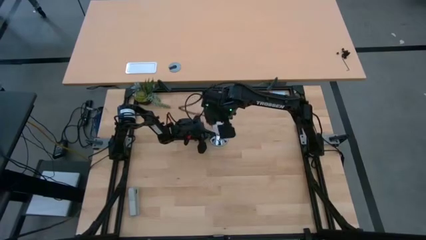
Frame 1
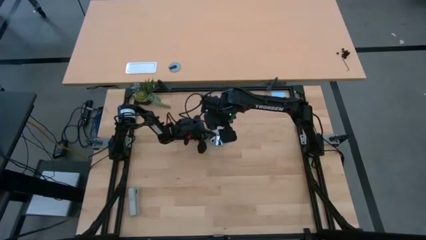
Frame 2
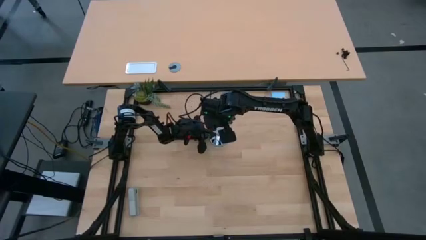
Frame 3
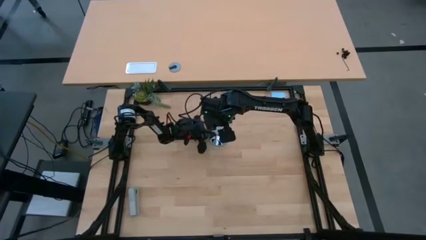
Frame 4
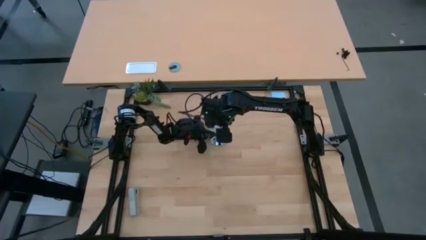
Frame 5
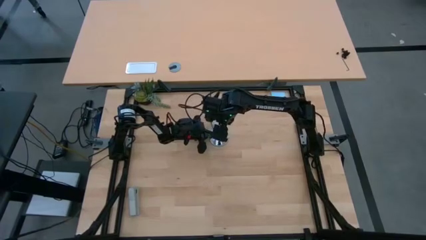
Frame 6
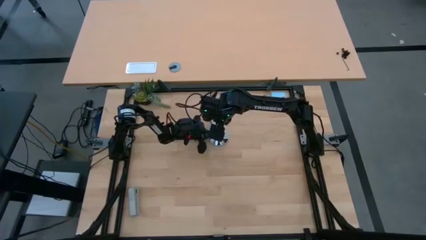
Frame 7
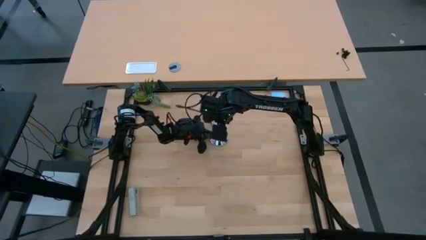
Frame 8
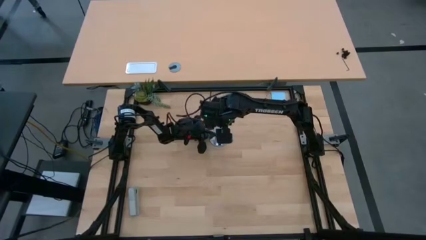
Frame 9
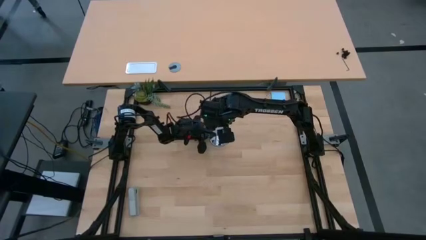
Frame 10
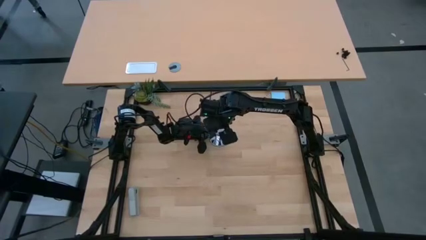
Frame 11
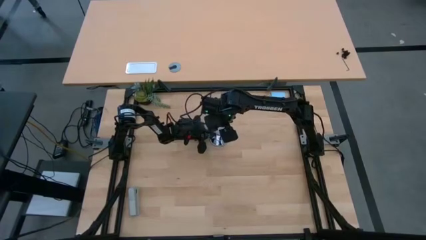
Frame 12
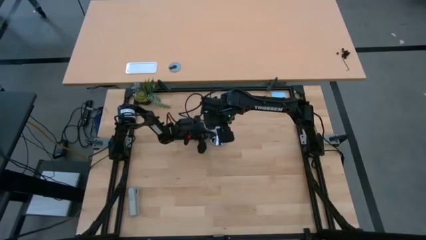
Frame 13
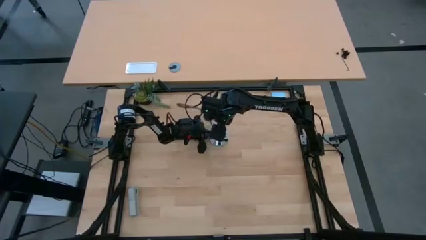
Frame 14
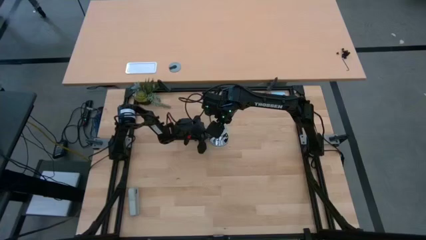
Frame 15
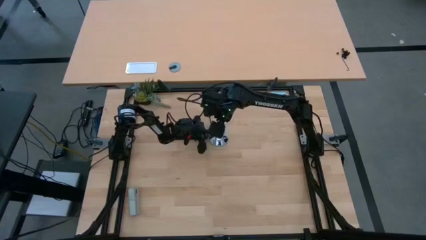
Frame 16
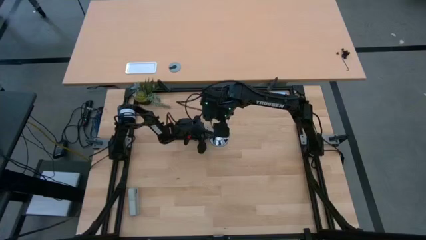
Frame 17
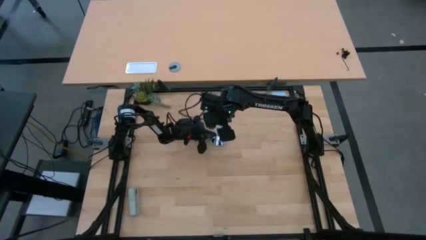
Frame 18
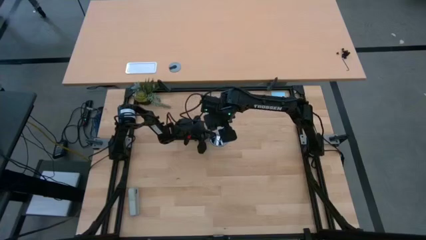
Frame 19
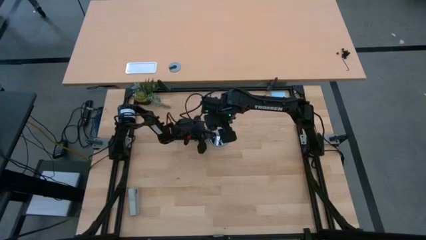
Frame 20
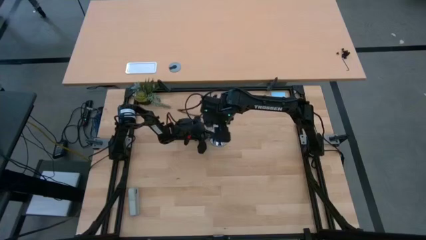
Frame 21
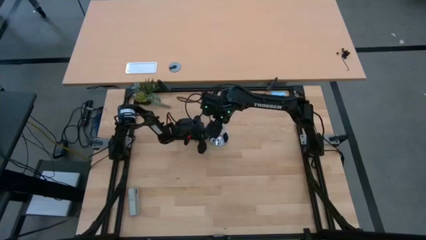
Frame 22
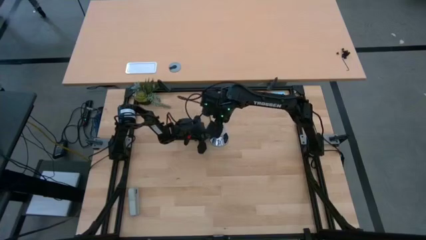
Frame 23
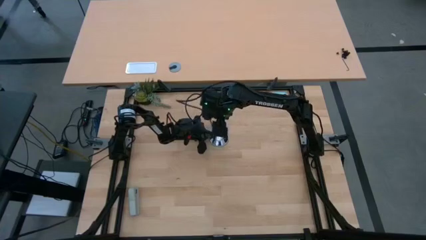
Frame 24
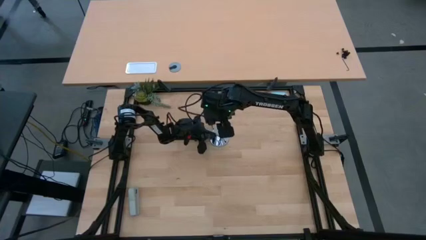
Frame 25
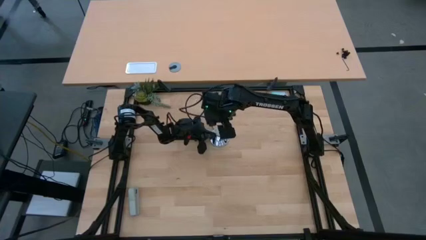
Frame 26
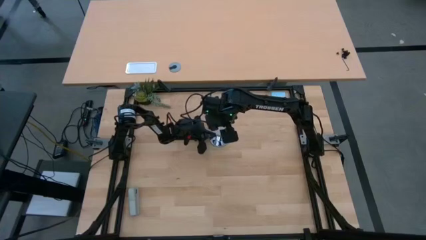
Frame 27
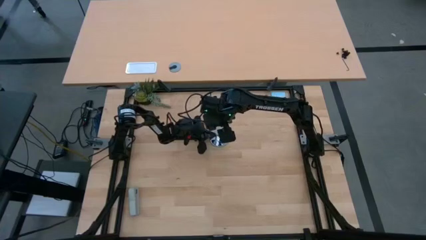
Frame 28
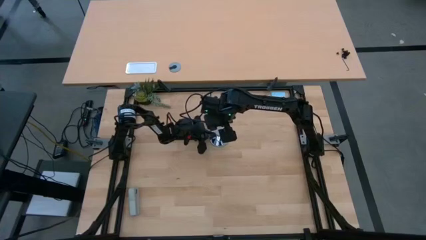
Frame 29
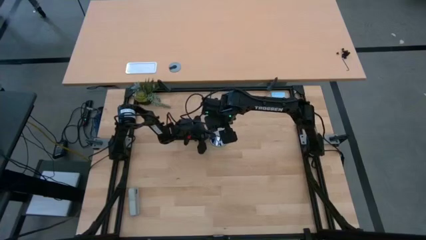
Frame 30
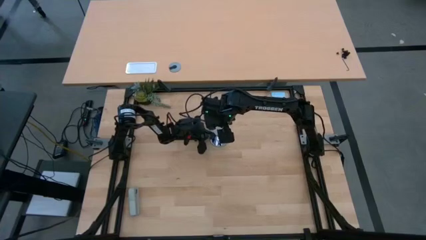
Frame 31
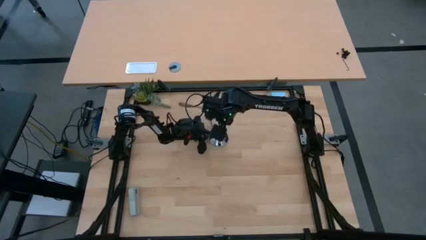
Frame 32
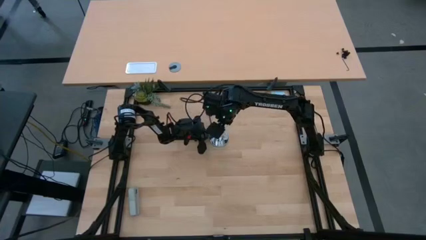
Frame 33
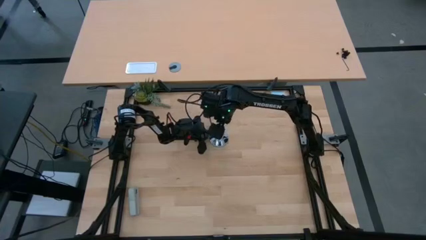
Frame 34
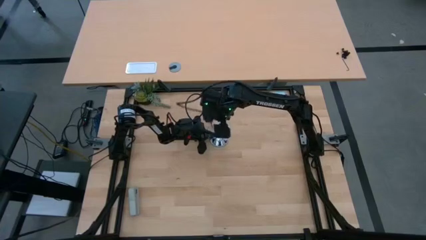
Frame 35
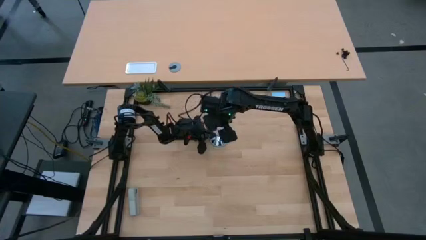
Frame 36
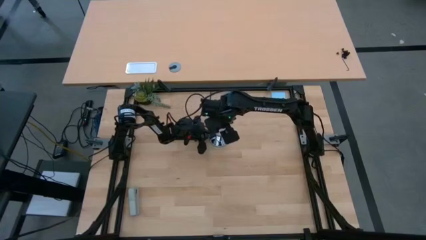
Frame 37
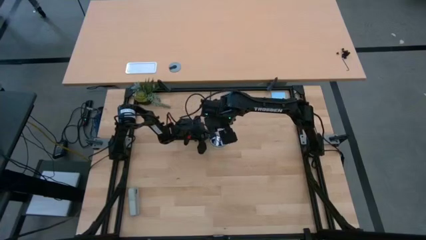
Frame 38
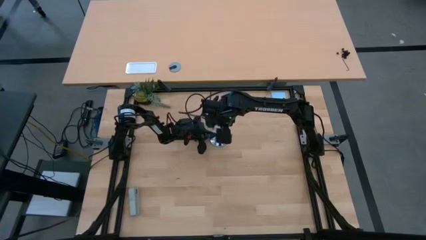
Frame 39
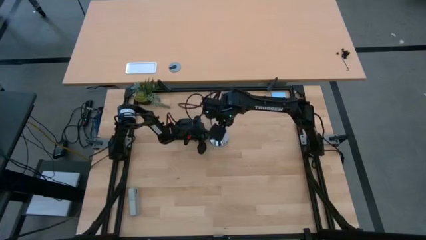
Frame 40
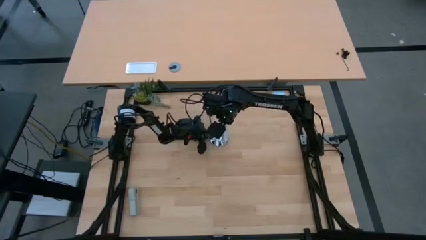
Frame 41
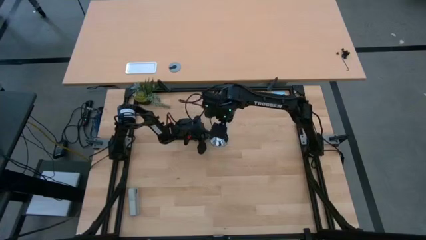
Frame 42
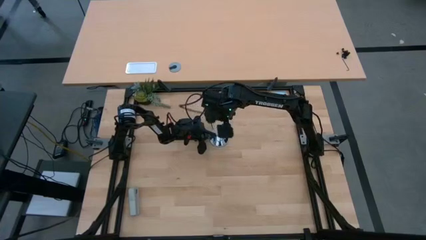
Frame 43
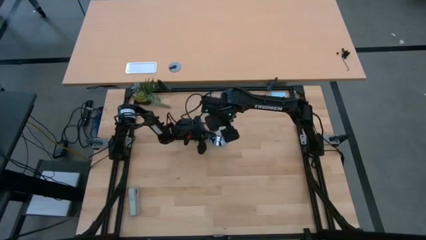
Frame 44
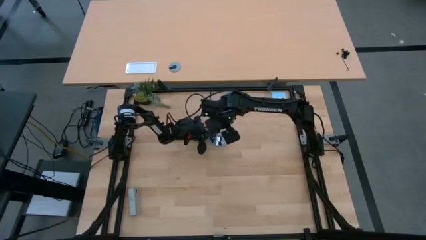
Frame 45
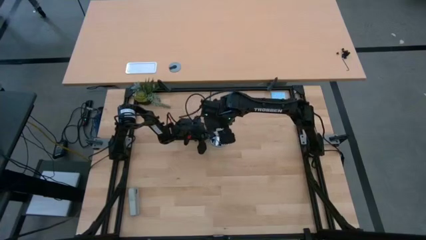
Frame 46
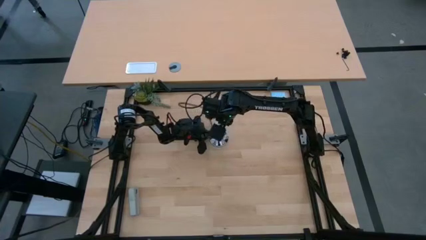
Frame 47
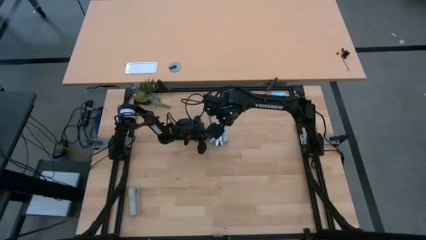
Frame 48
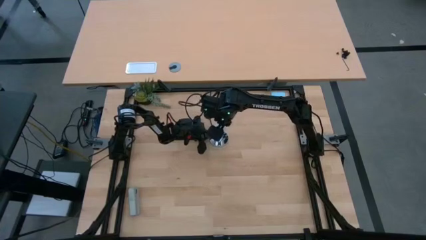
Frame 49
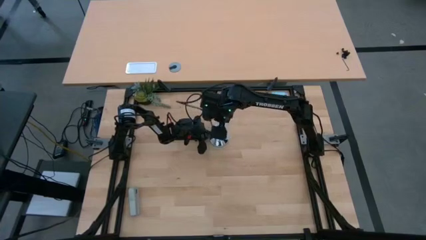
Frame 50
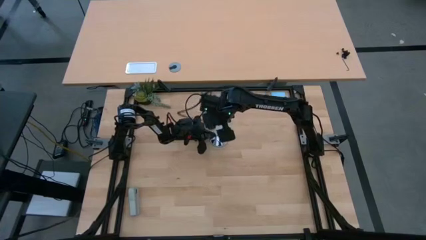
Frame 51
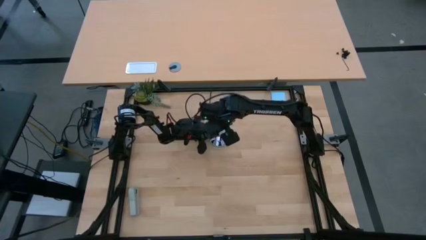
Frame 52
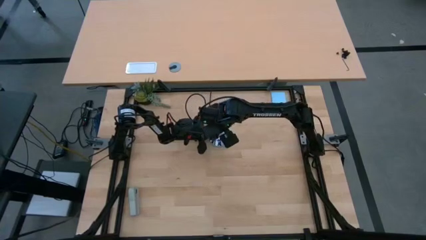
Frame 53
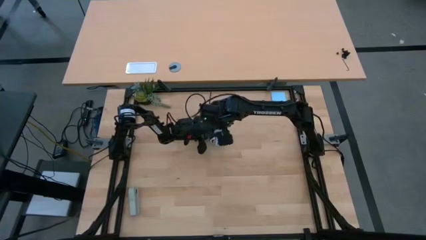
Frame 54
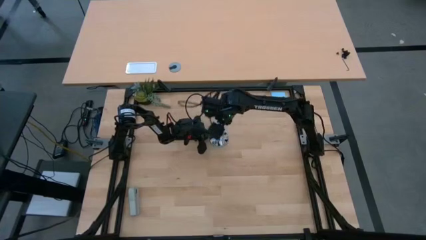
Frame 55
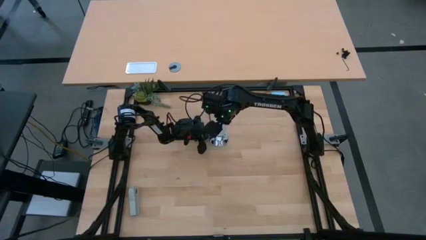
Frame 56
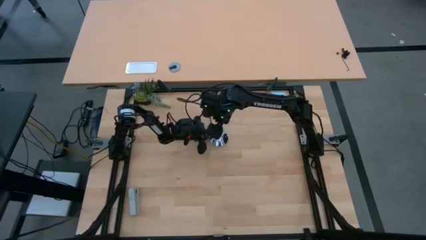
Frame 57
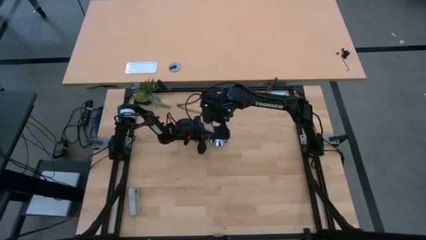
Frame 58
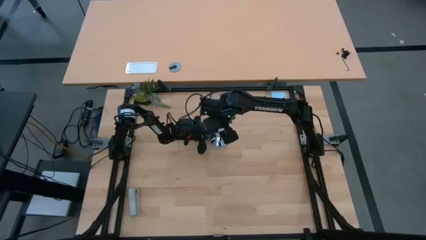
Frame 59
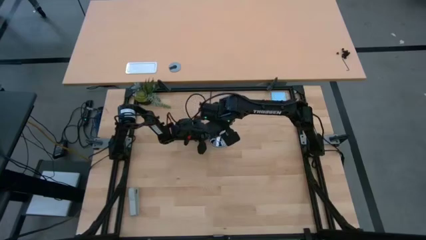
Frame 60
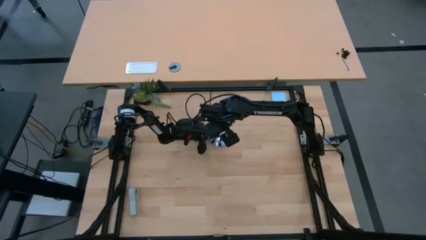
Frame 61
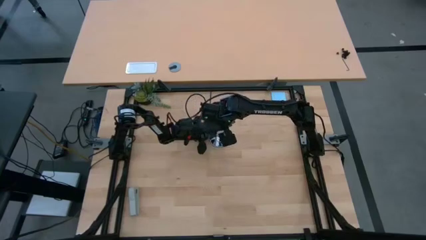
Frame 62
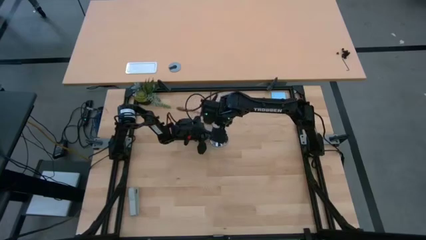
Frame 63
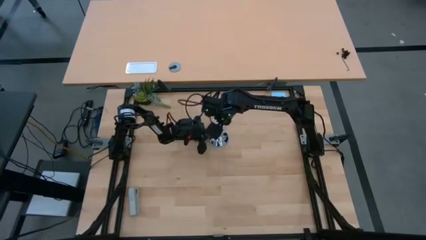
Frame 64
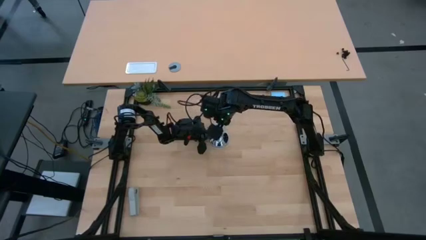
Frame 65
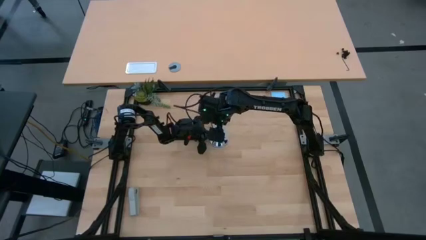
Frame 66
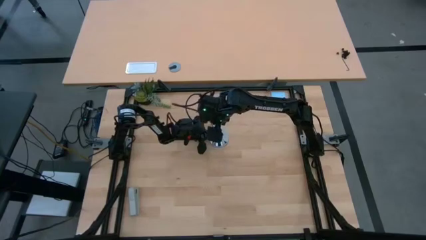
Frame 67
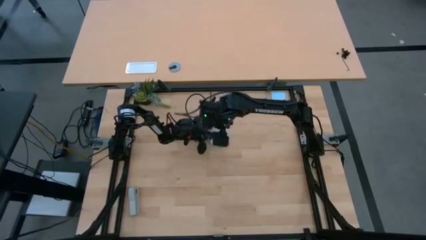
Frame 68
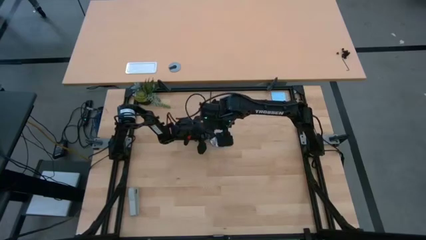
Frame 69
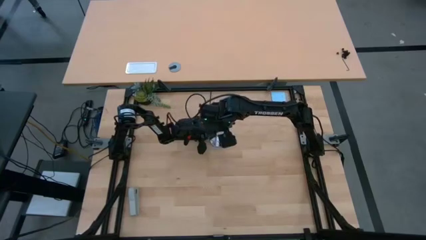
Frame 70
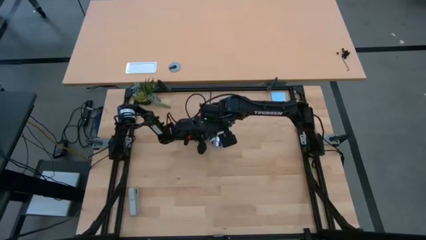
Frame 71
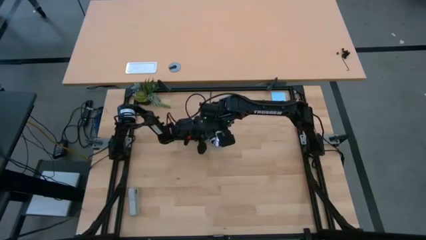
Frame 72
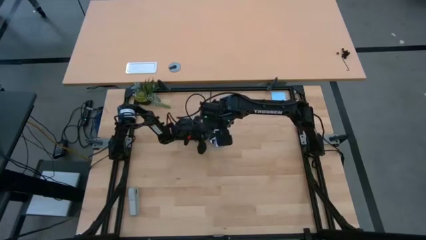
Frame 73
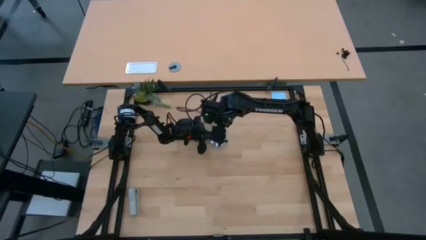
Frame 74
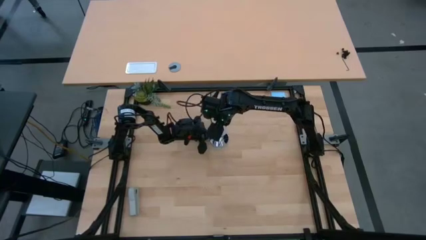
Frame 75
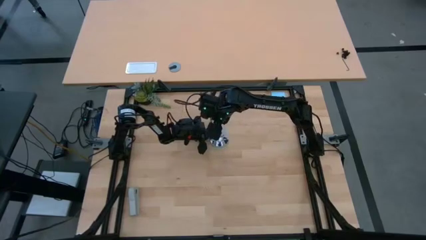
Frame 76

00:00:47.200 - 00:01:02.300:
Task: Screw lightbulb
Insert the white lightbulb into the silver lamp
